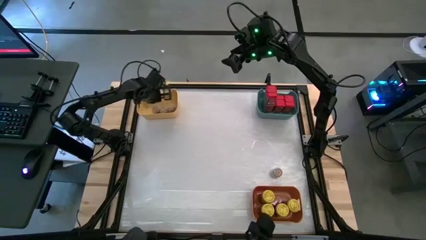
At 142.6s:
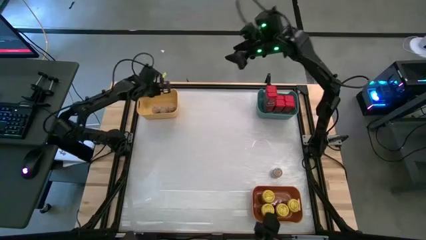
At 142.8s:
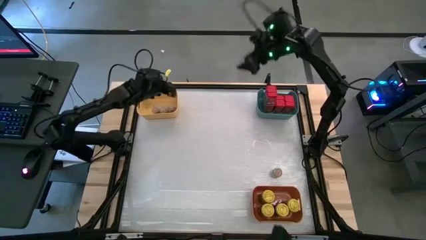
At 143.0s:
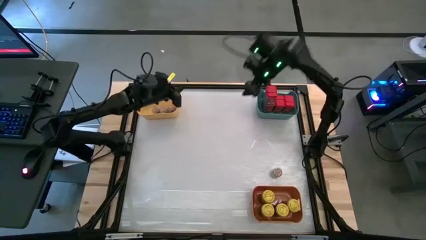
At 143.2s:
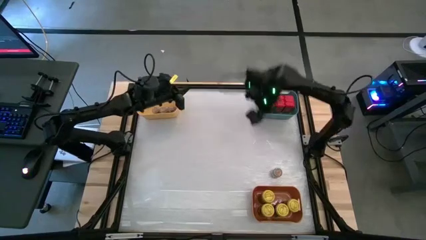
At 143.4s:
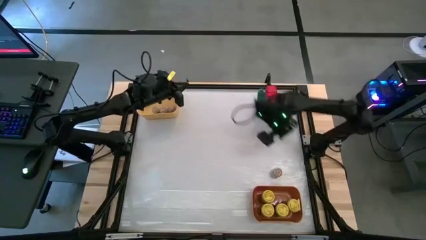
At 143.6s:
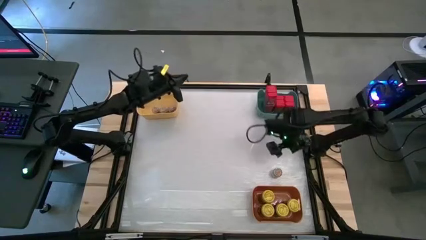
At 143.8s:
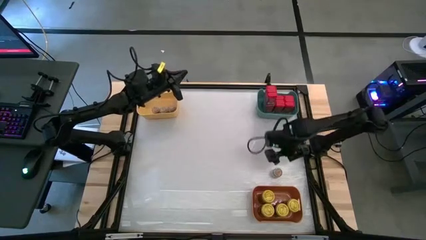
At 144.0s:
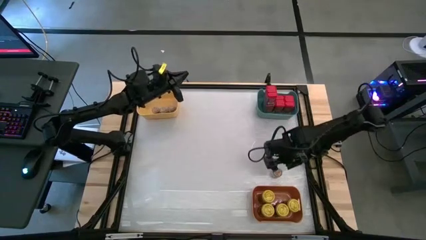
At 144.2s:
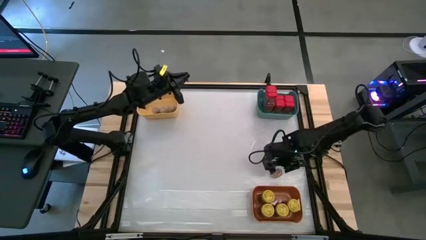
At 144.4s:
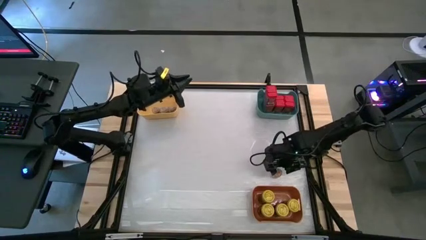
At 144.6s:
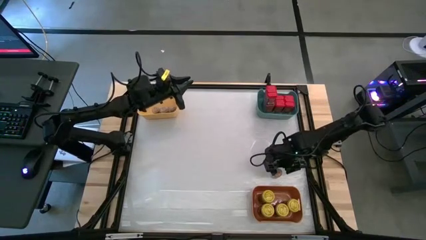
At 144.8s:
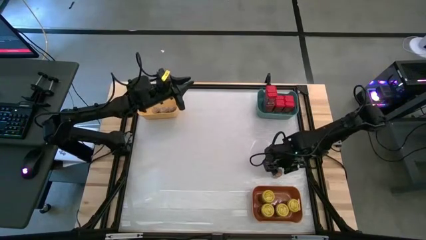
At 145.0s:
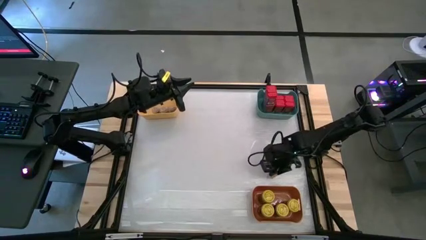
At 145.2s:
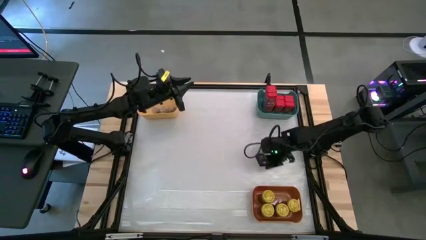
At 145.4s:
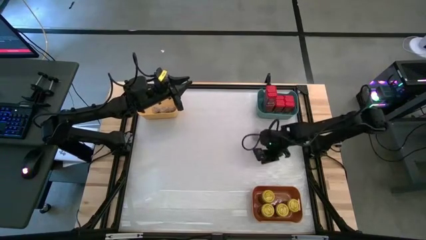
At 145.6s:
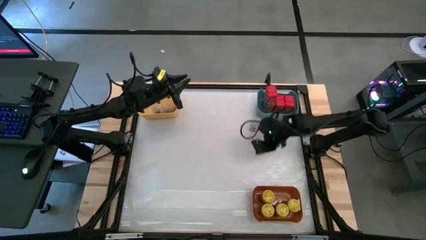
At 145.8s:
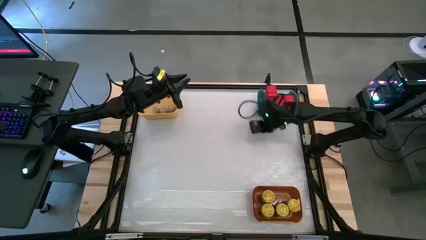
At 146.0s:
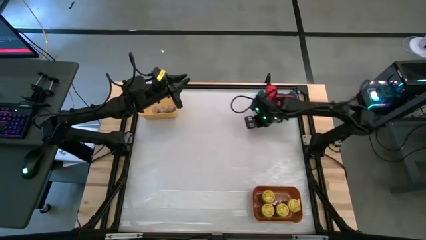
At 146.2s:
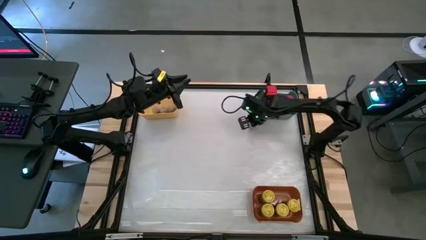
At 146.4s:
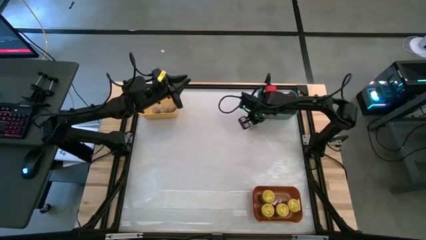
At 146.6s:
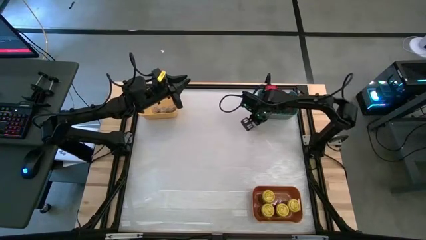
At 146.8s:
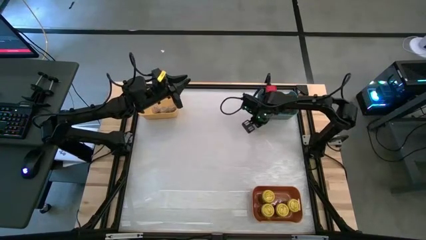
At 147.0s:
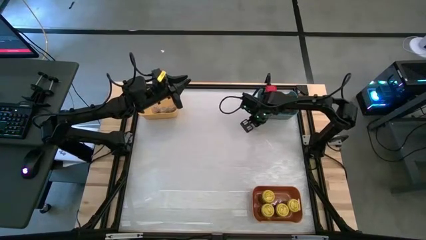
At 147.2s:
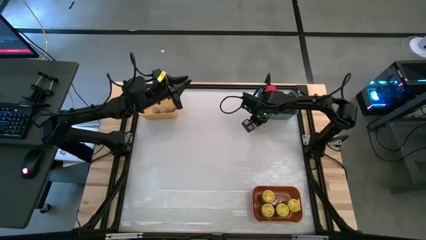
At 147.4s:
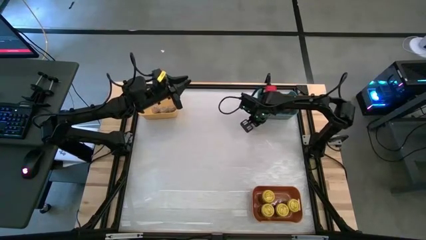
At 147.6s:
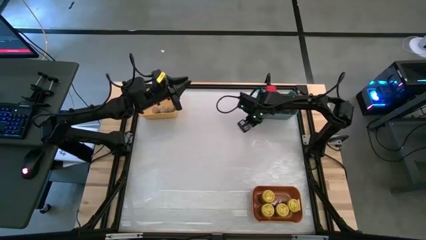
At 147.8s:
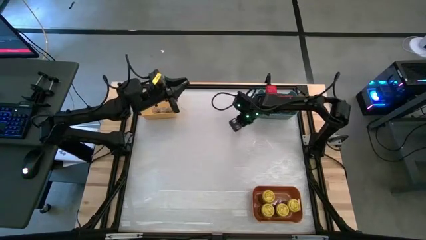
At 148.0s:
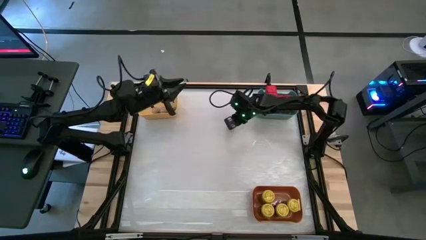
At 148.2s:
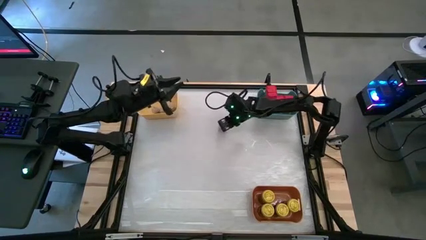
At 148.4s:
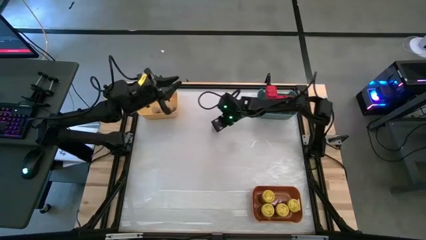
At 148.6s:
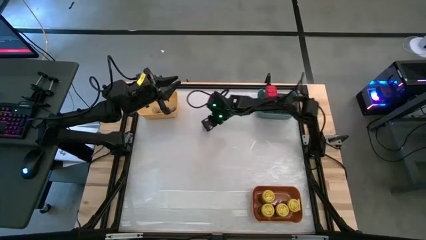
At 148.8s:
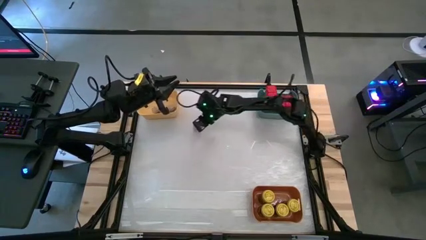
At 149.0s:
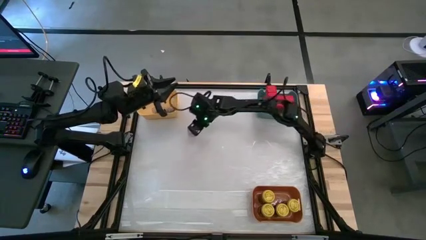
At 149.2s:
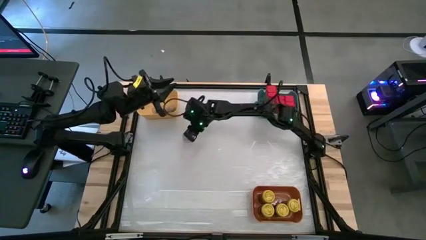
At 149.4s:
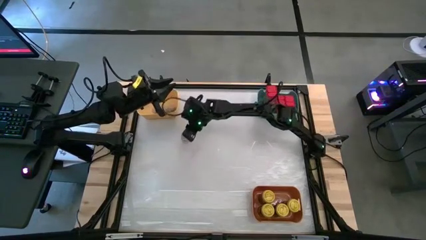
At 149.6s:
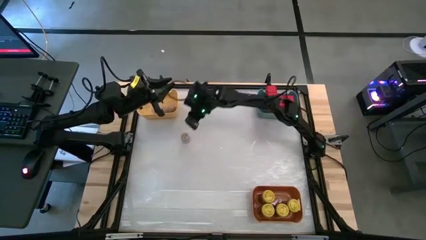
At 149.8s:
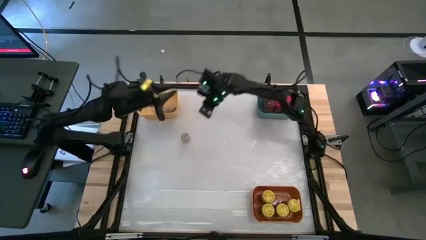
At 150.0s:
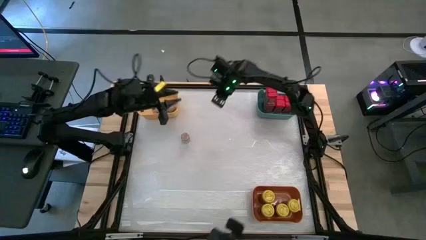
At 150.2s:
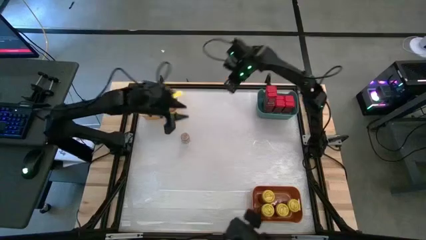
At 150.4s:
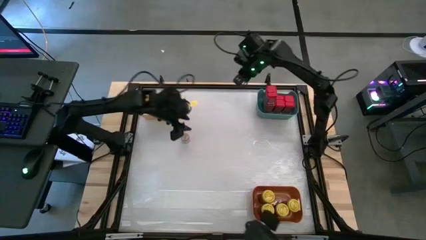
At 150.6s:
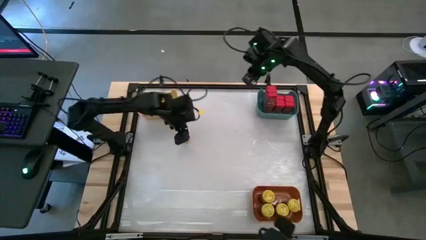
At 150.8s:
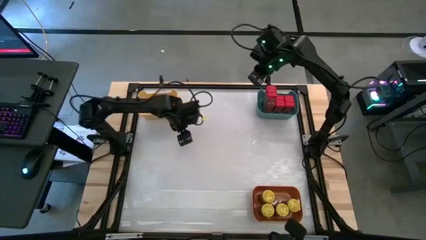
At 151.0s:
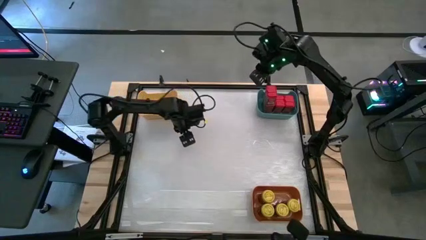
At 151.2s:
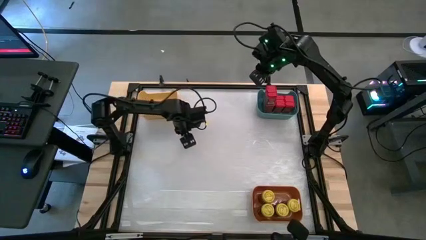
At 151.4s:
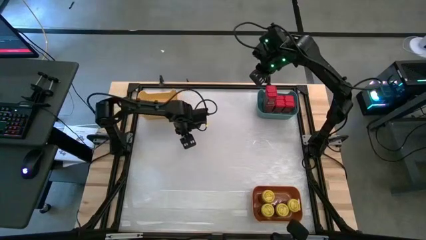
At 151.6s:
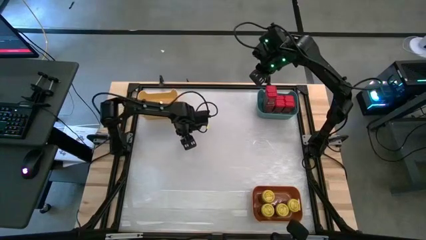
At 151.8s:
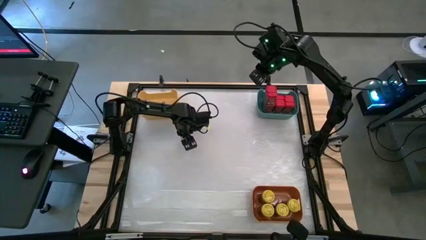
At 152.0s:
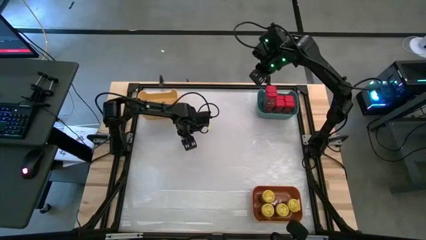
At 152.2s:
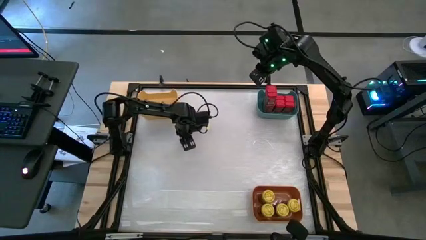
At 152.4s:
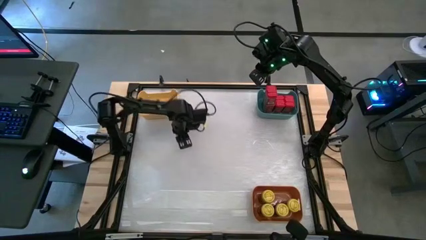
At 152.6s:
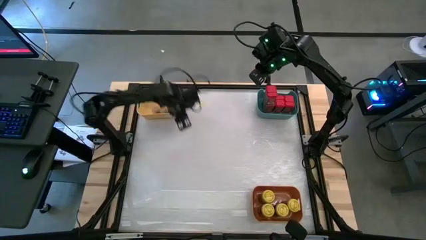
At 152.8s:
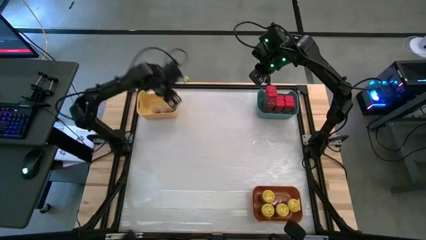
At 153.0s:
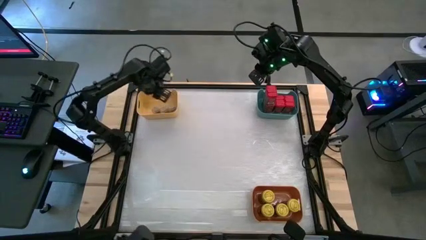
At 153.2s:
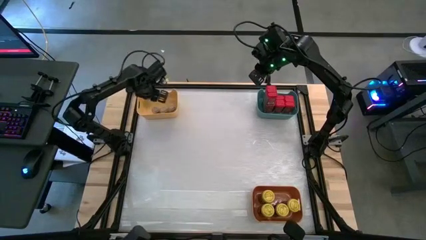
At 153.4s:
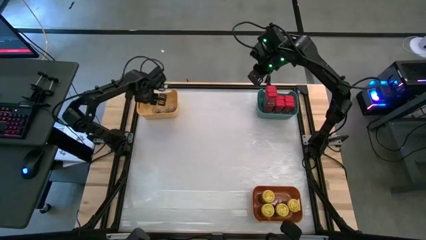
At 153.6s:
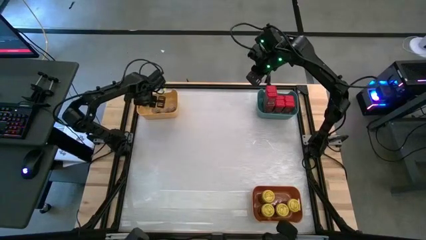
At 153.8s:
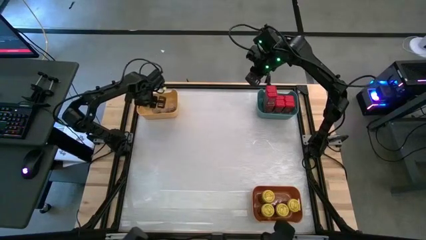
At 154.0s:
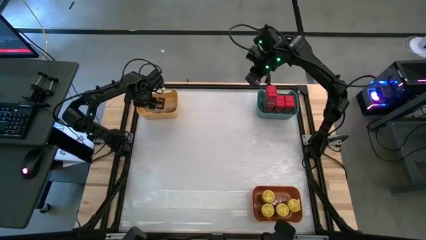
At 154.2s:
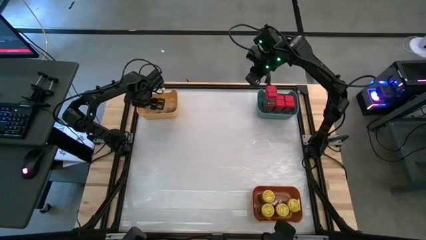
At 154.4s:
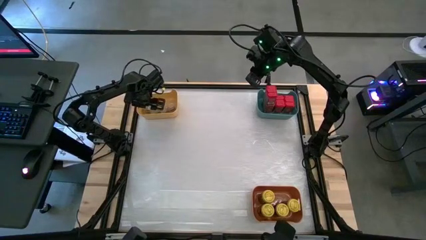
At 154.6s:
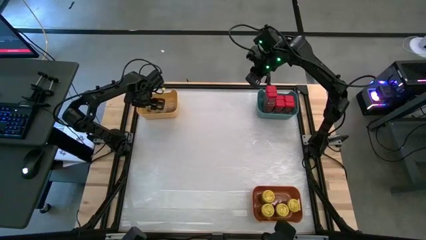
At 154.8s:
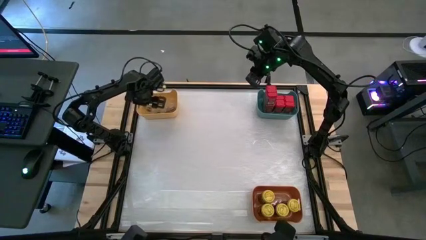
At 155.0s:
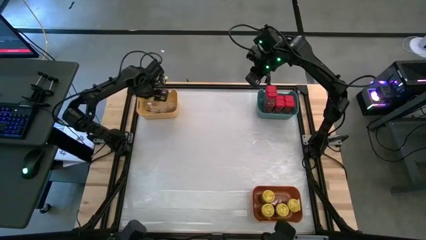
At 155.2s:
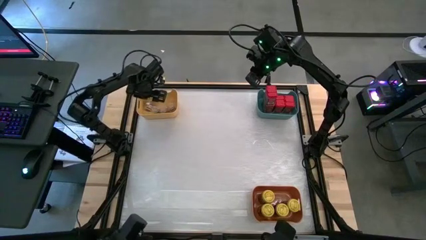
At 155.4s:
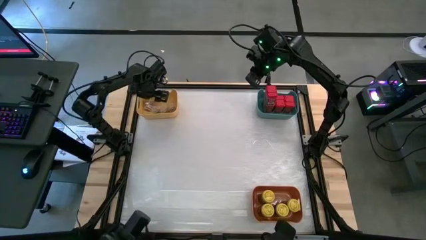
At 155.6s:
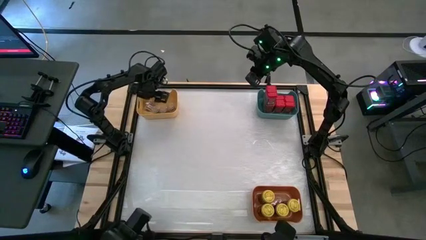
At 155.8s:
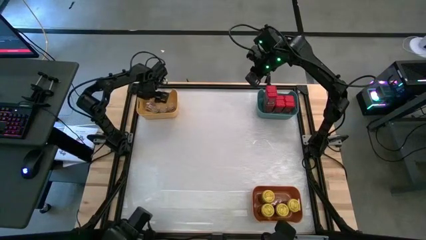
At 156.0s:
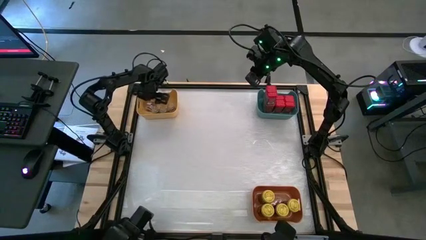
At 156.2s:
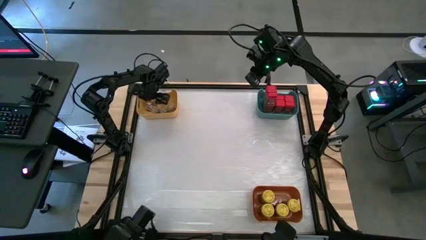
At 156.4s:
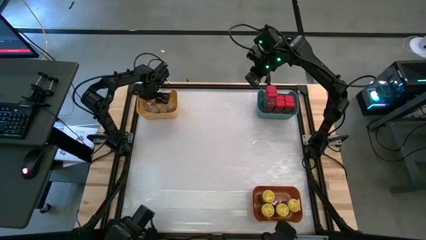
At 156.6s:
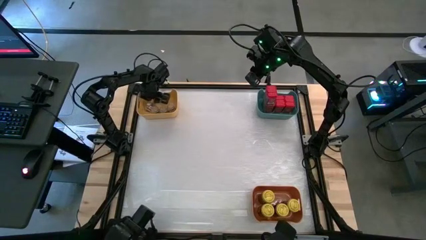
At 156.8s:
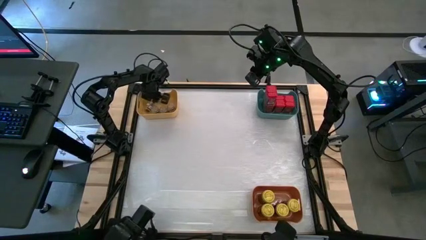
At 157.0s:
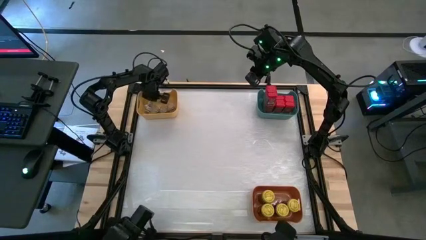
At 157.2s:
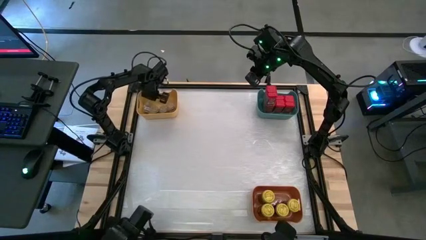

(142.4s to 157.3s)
Task: Sort spices by type
Put the brown seasoning bottle into the yellow bin

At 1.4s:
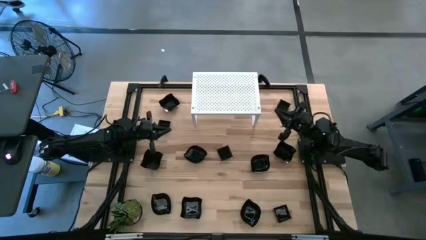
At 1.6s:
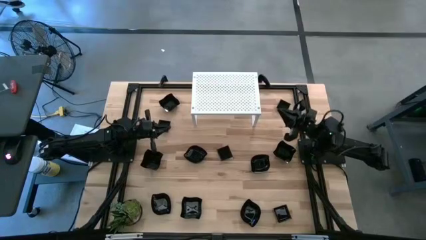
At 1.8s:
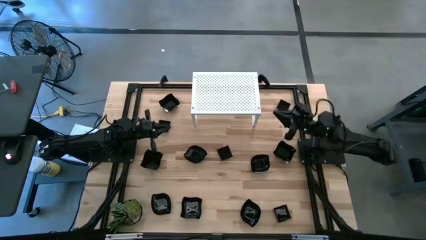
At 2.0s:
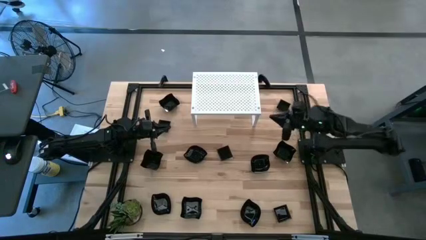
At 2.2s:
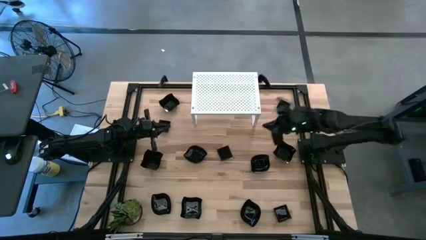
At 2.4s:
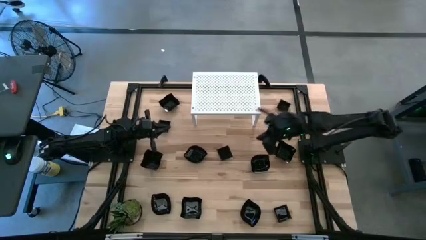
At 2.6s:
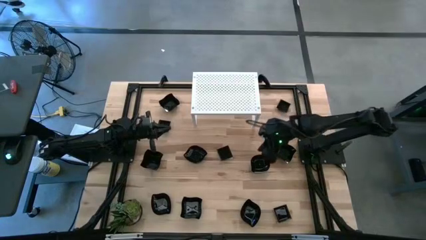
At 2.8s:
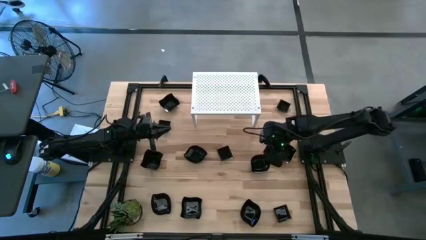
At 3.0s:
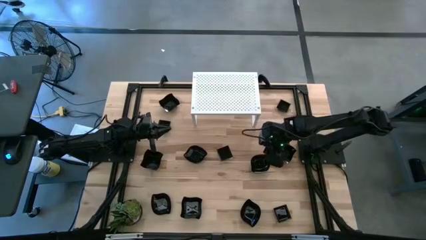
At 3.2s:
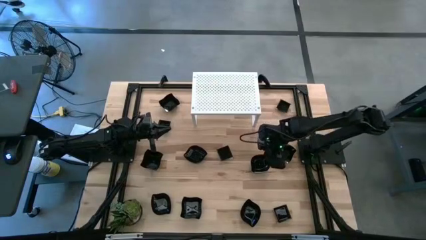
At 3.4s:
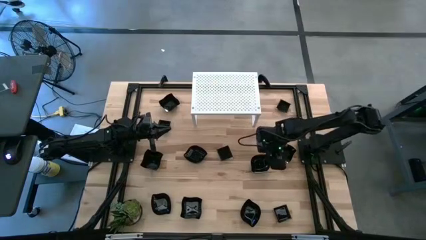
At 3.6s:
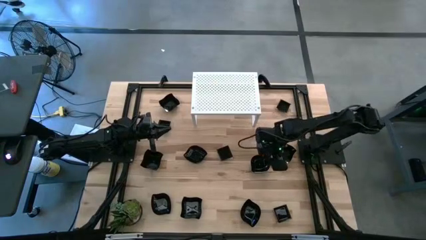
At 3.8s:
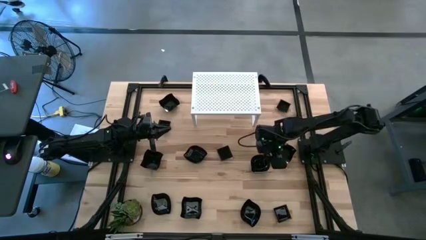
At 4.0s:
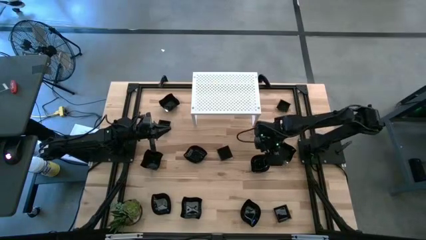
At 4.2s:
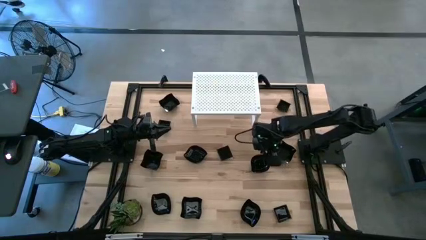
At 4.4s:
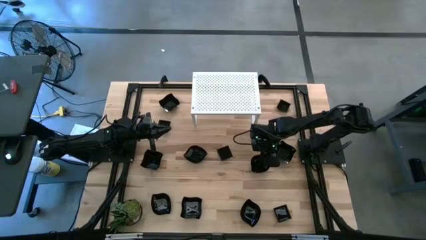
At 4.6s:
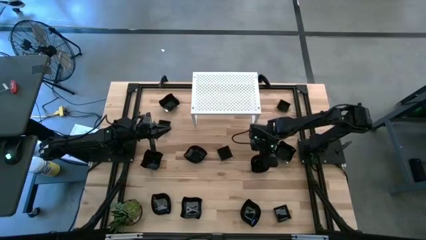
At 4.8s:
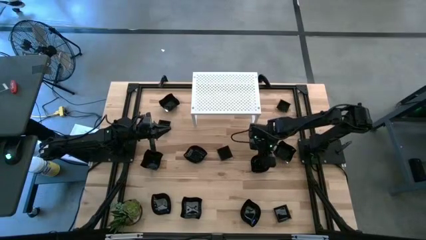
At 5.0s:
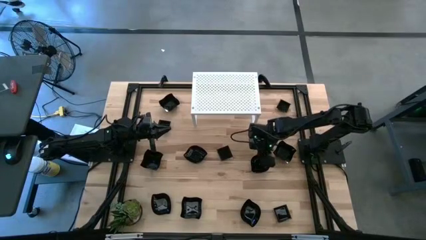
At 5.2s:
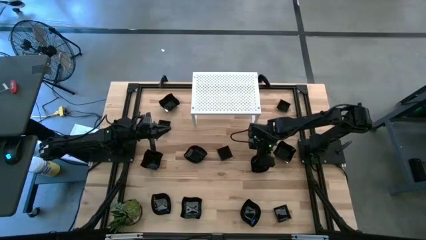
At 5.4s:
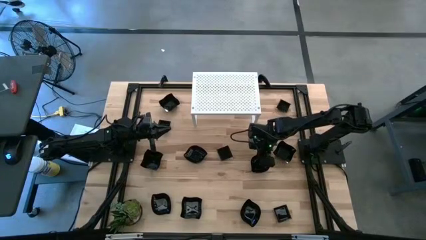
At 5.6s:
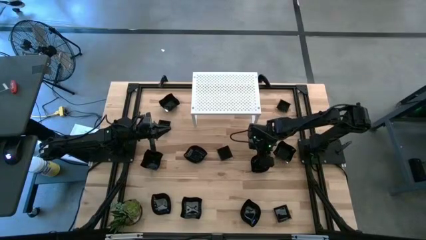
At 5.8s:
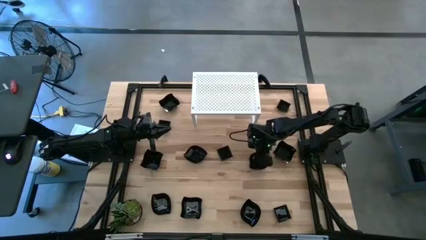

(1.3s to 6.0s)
Task: Pick & Place Mini shaped plates
Put the black leaf-shaped plate on the shelf
